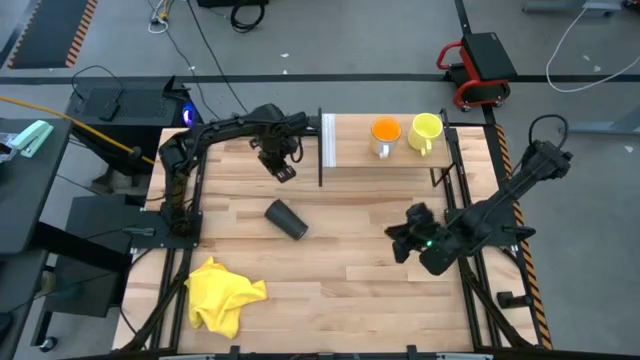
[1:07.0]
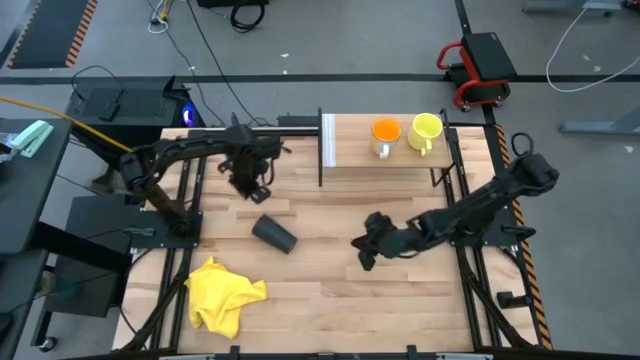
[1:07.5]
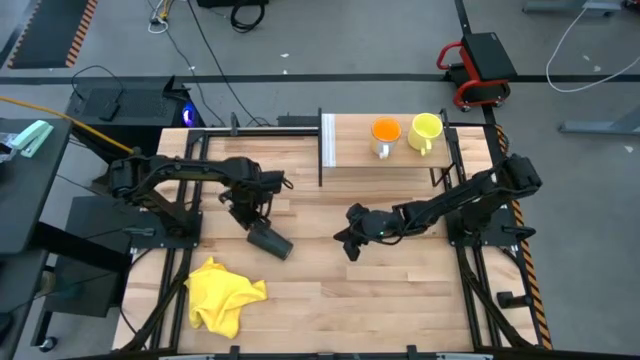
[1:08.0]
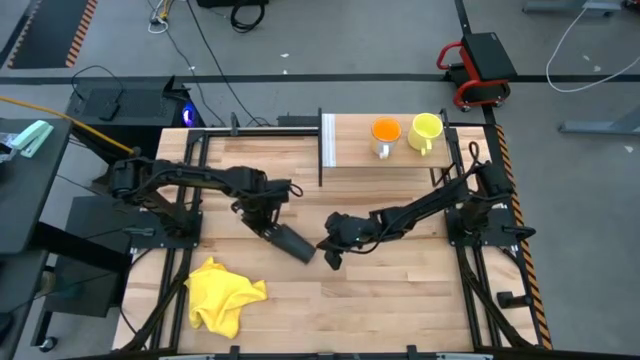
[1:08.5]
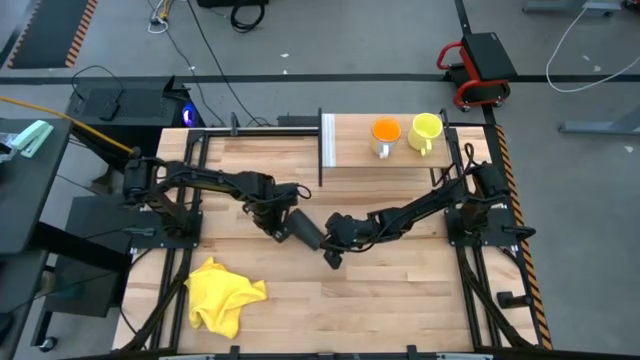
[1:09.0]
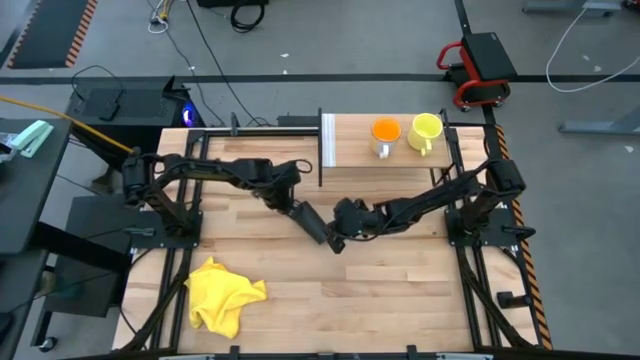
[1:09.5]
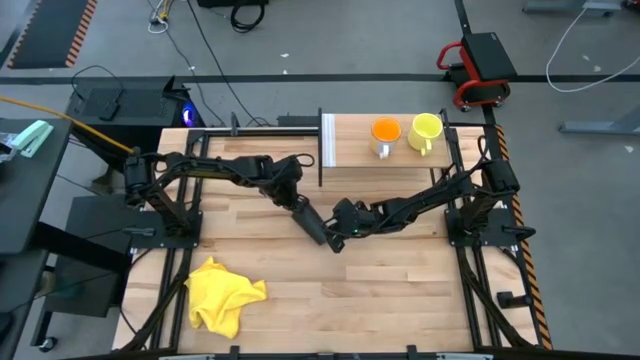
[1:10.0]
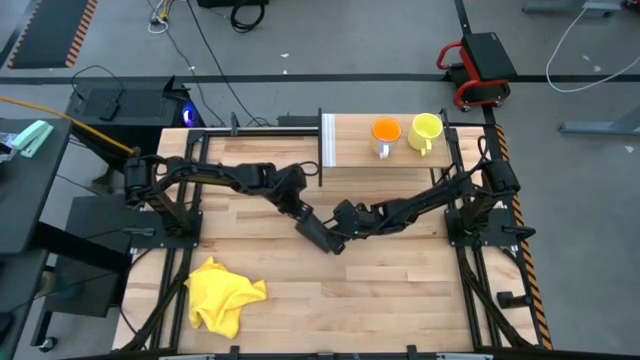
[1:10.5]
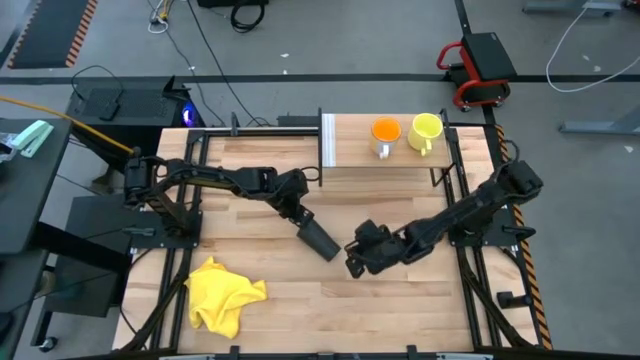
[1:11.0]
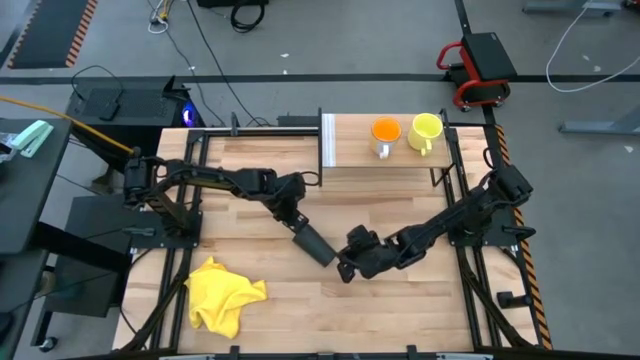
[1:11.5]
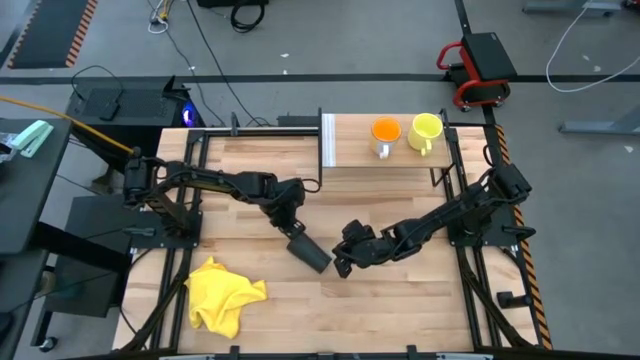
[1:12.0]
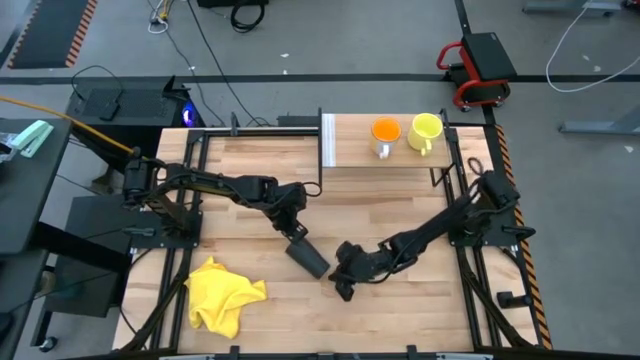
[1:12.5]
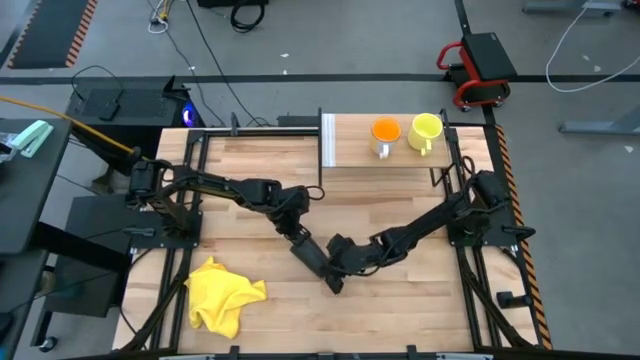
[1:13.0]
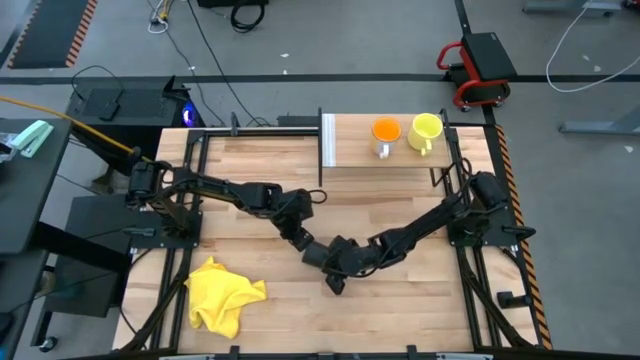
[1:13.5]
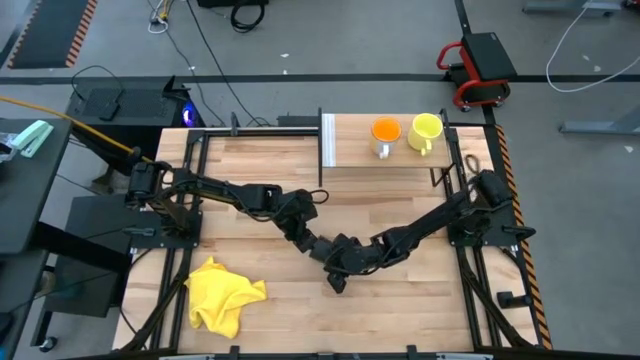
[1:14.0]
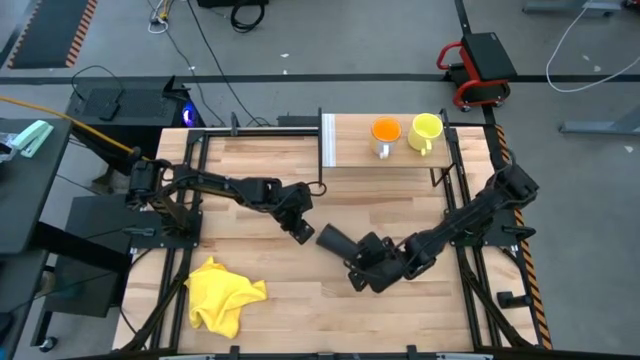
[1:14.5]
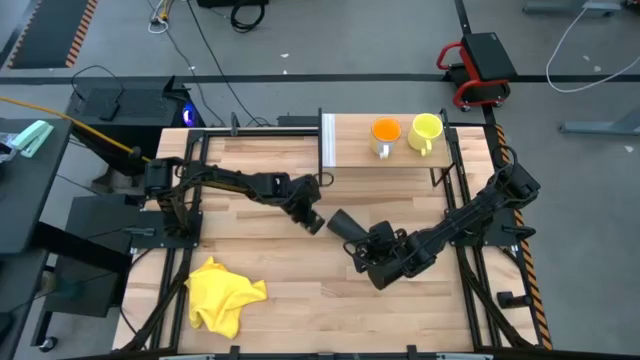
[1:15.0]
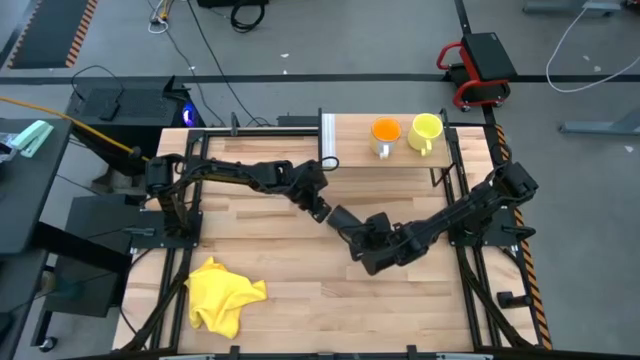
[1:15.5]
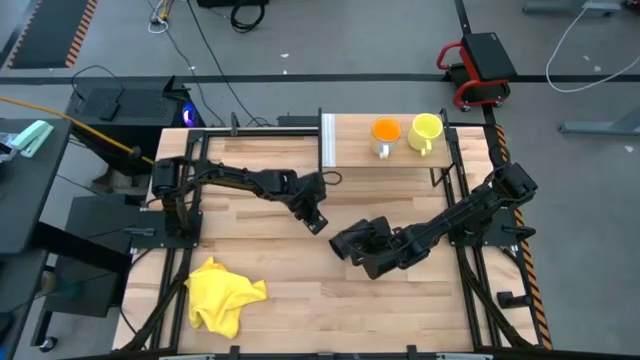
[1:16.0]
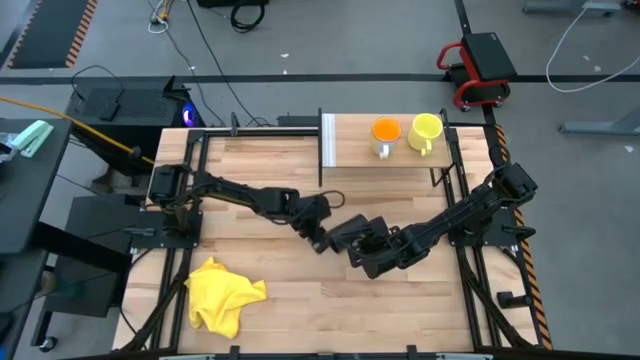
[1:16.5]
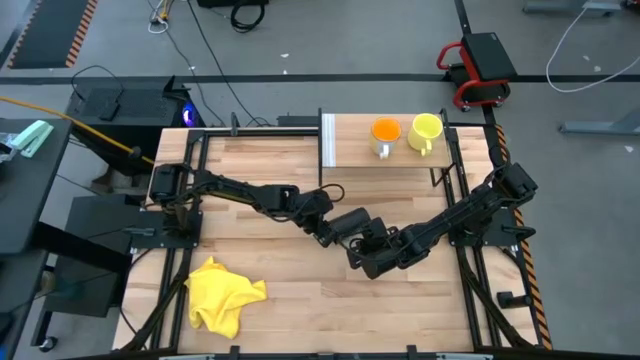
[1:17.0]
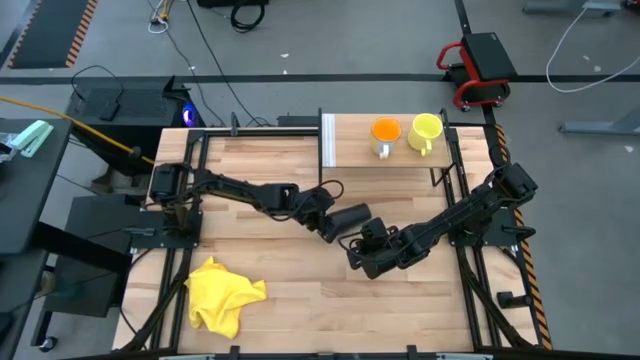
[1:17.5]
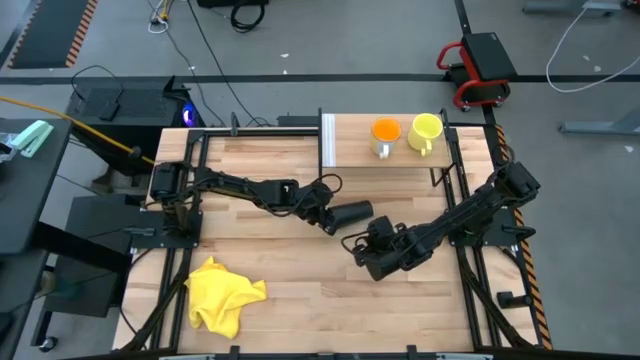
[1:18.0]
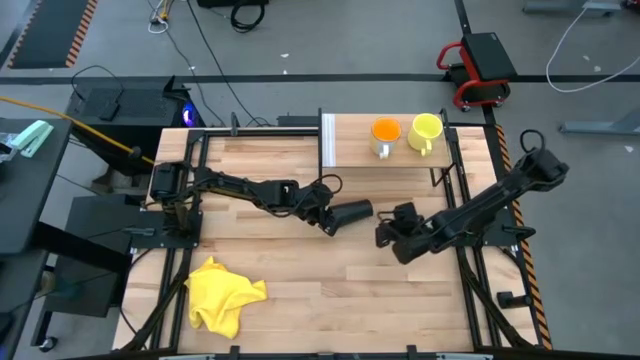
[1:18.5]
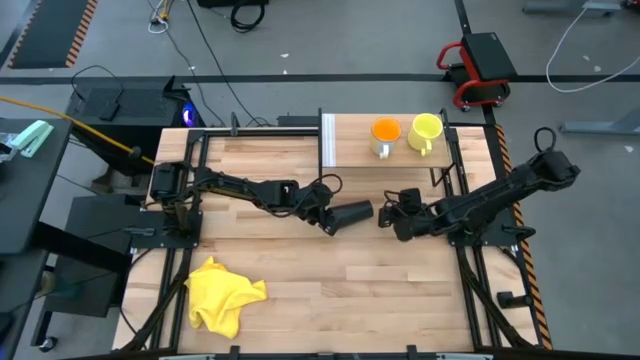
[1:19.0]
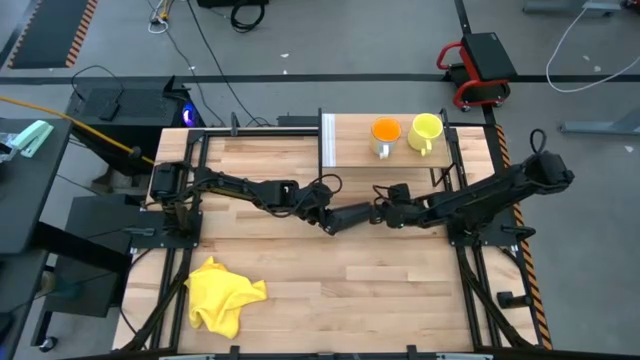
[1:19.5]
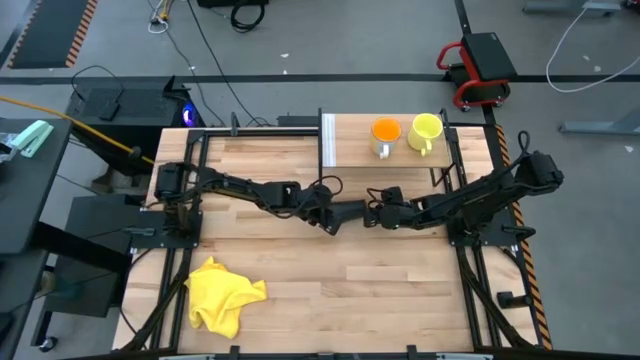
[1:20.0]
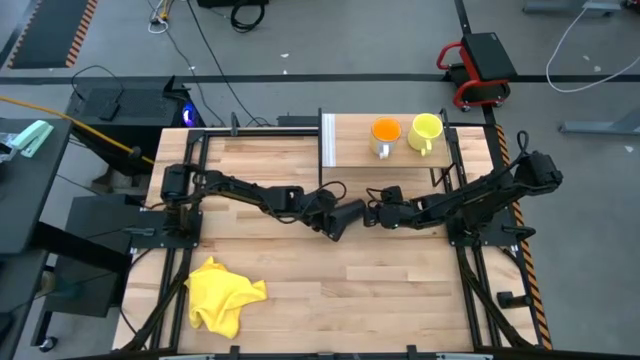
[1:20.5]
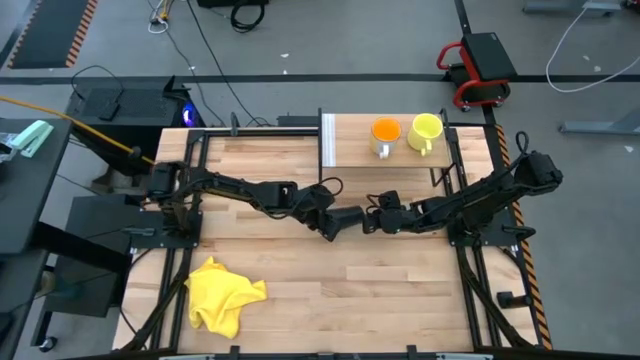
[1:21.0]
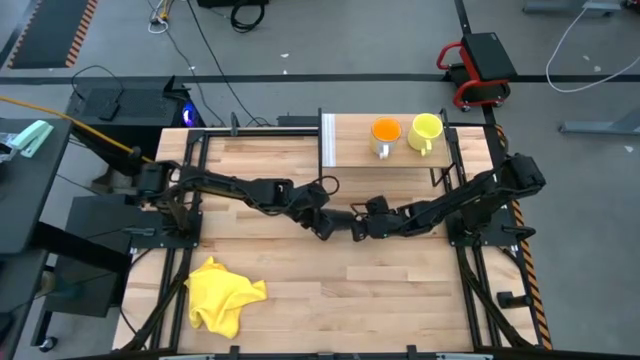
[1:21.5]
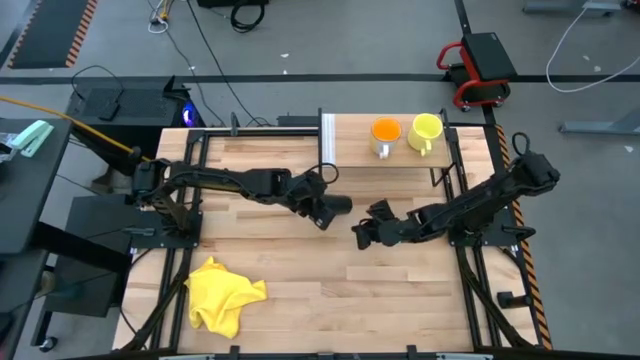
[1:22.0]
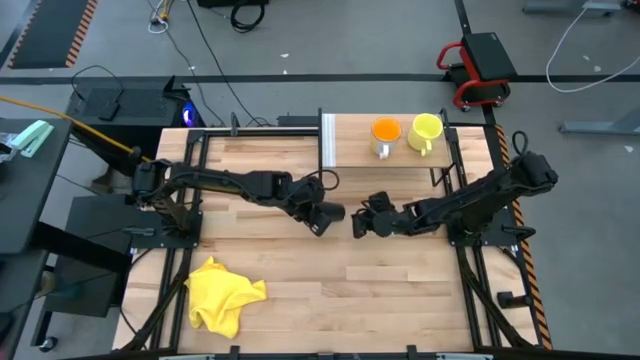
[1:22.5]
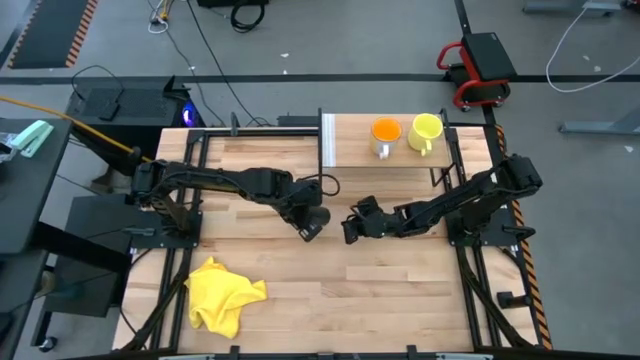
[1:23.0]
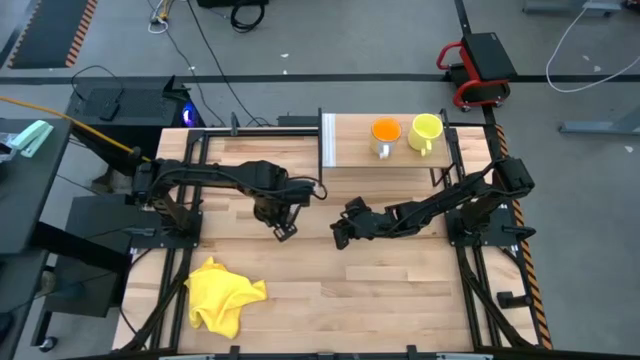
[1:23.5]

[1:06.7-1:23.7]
Task: Stack small to large cups/mugs on shelf
Put the black cup on the shelf

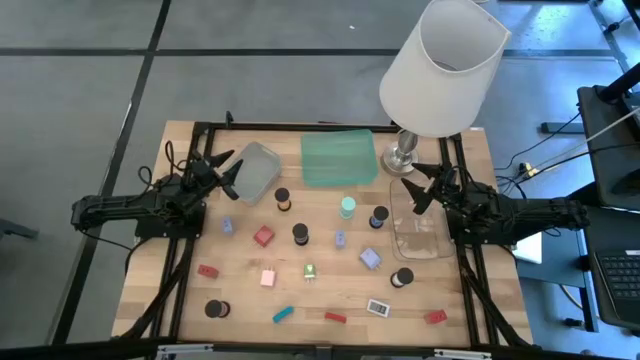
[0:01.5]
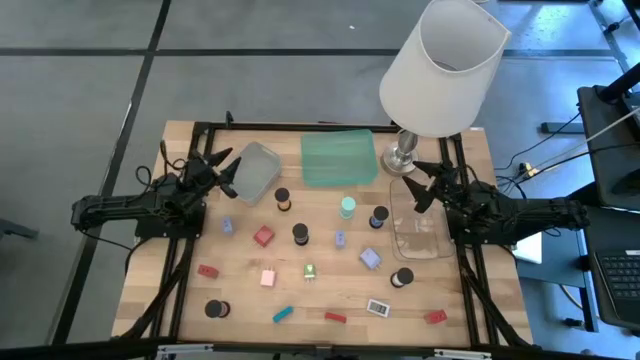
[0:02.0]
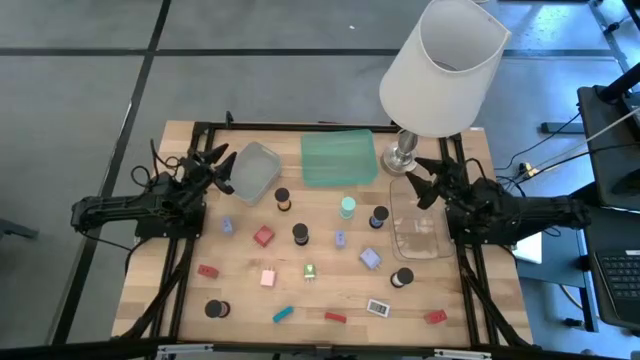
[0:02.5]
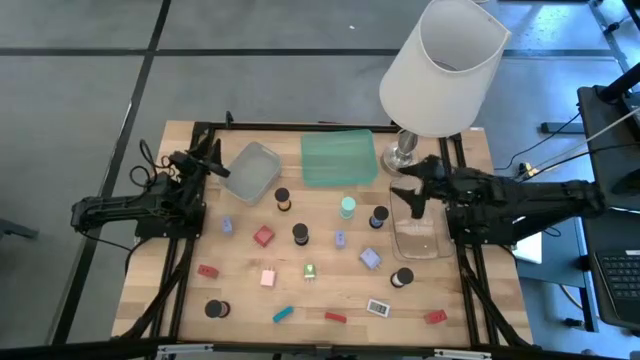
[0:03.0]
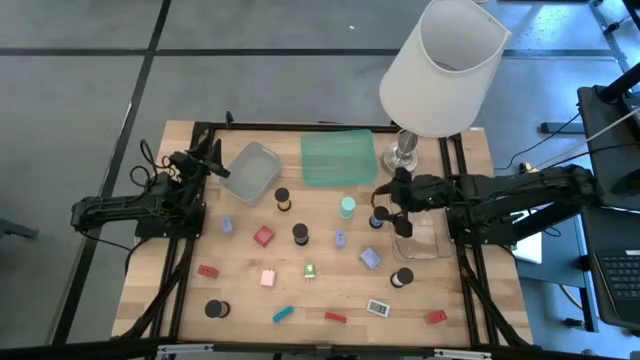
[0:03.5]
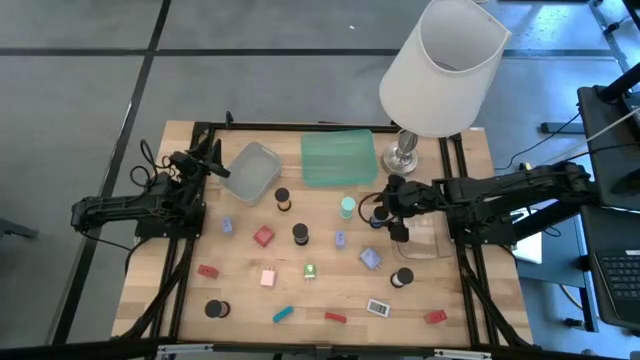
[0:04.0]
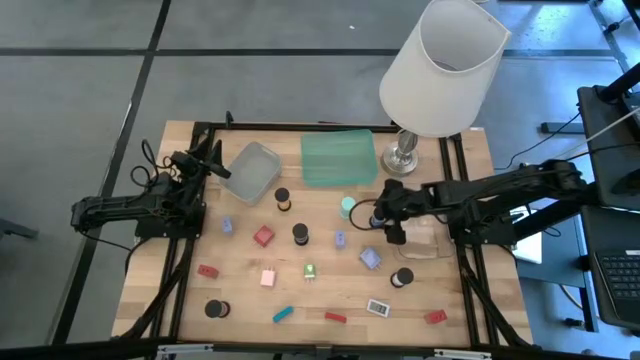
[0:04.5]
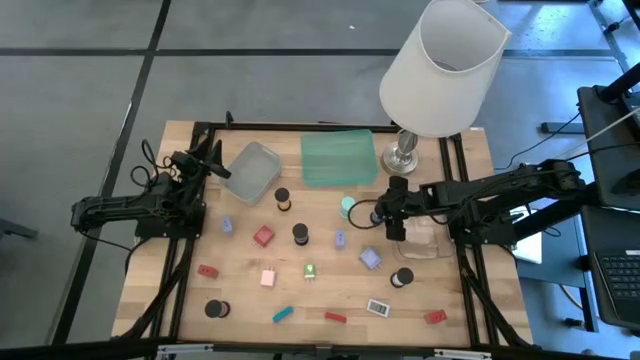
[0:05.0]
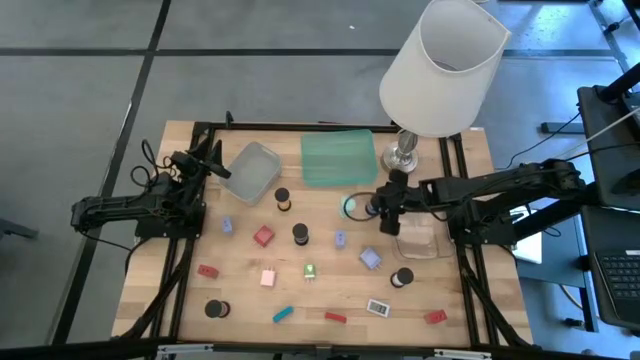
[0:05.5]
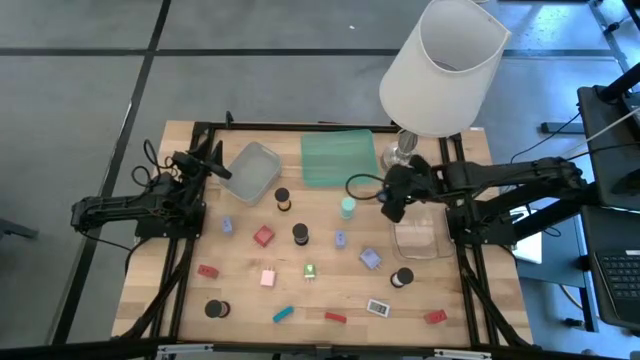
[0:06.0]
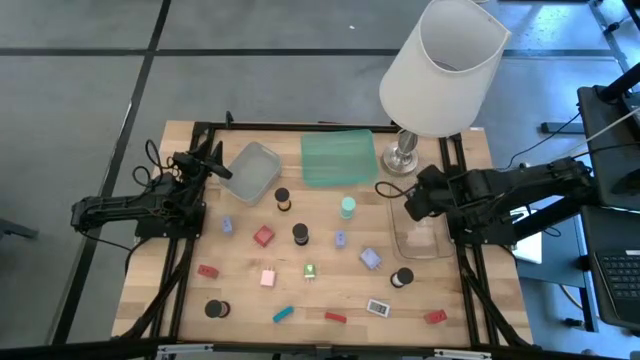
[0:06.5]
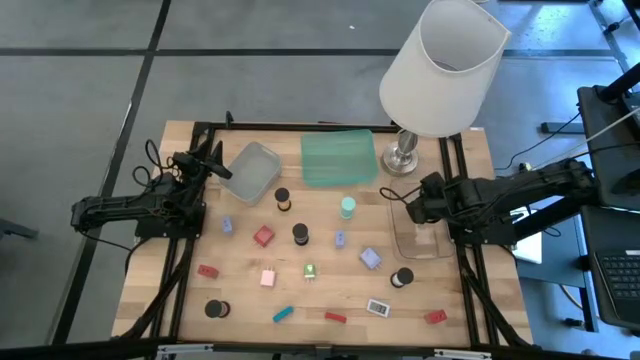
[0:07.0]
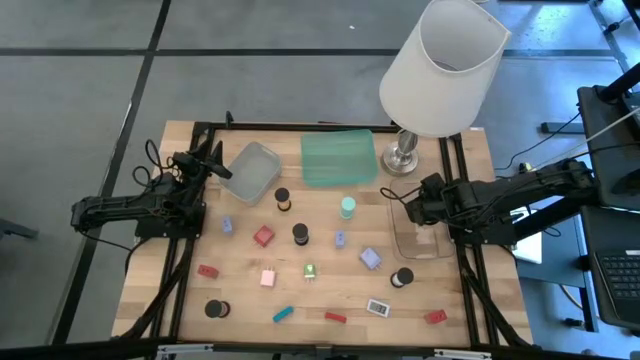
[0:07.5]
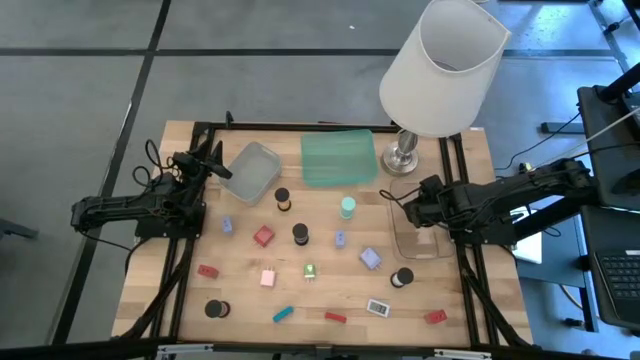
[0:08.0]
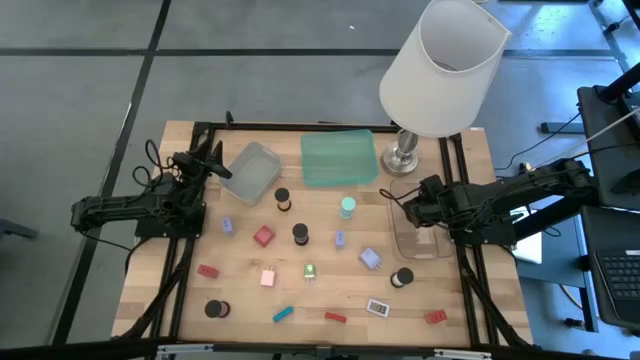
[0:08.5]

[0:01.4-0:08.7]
Task: Pick & Place Office items
Put the right blue hourglass into the transparent bin
